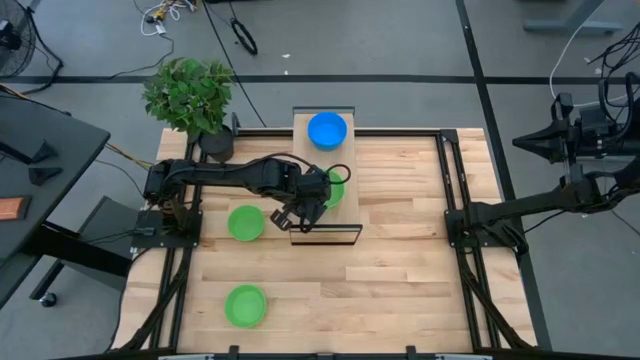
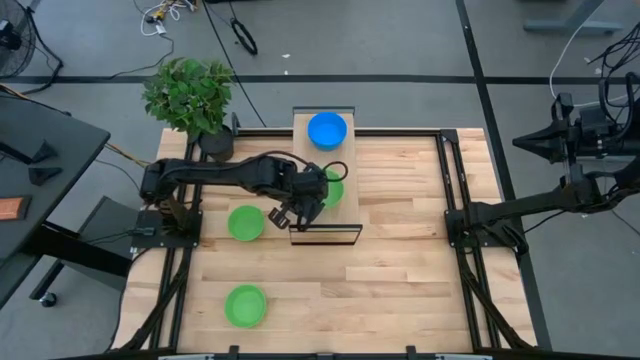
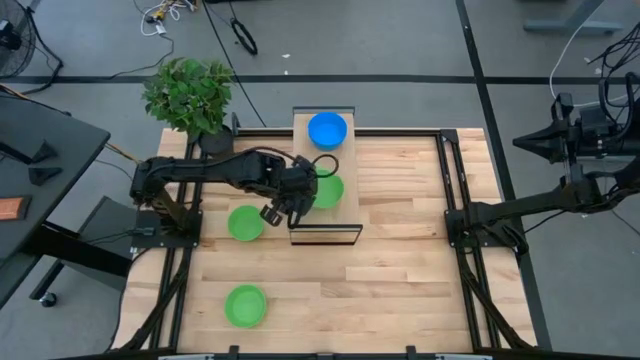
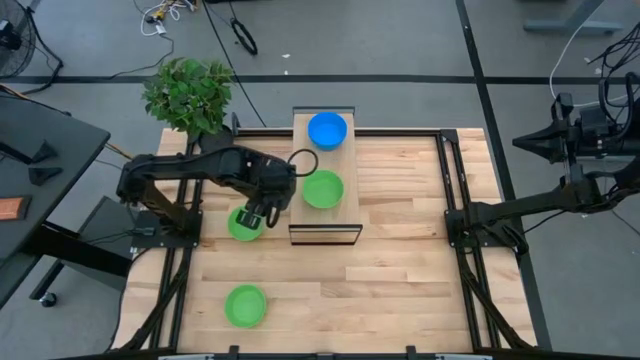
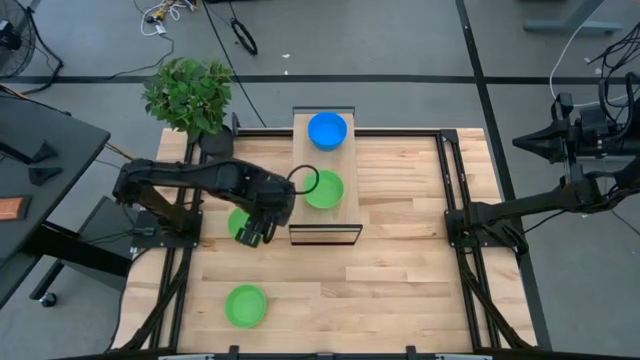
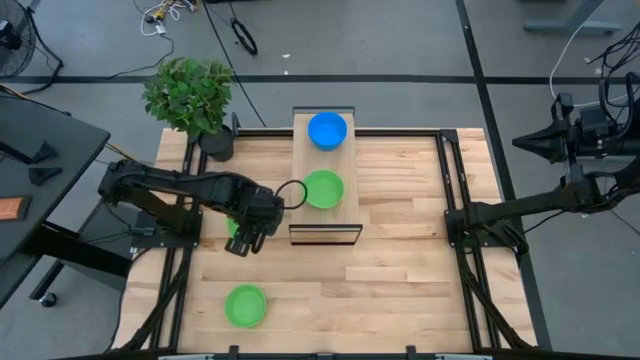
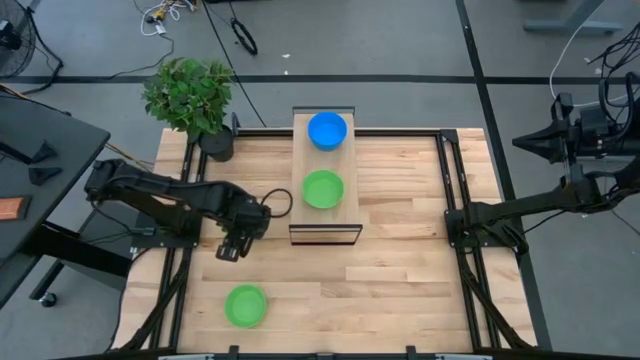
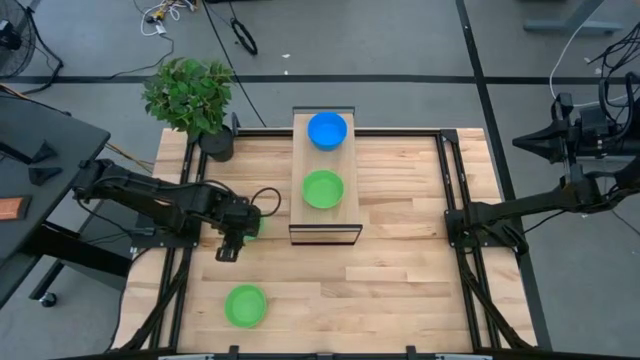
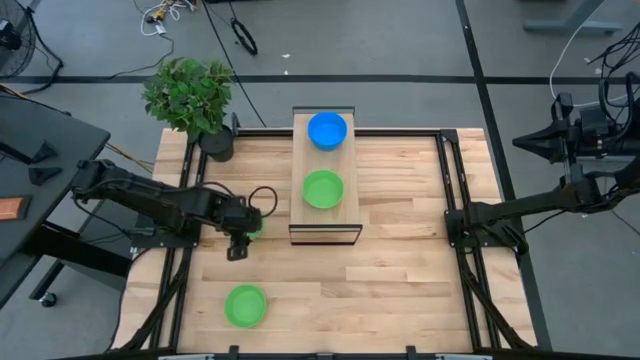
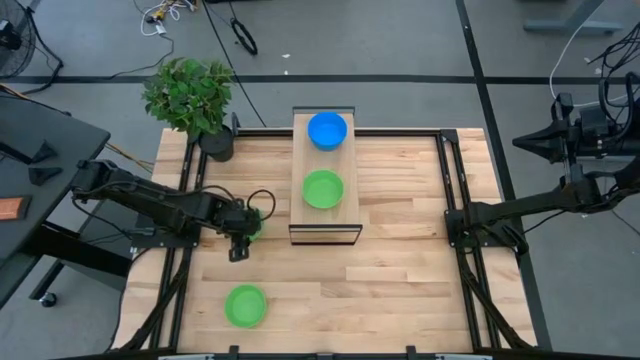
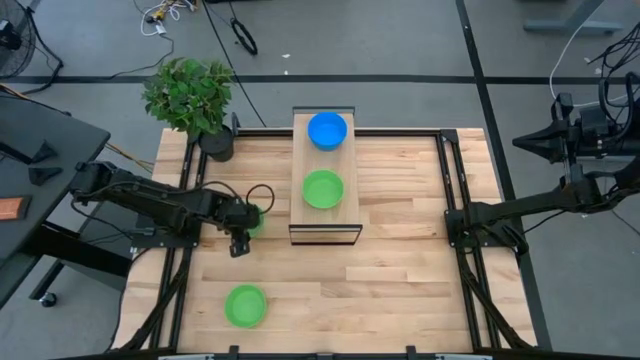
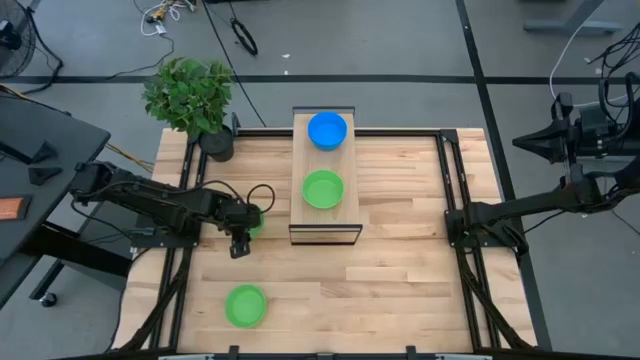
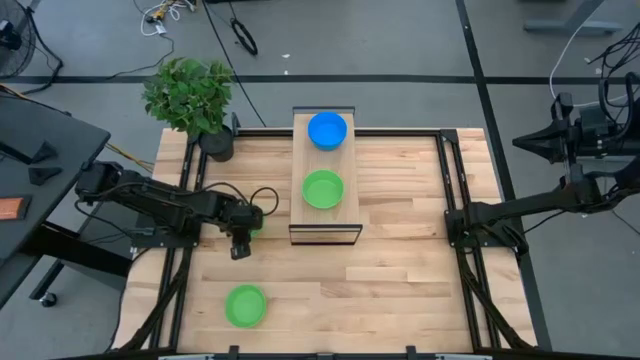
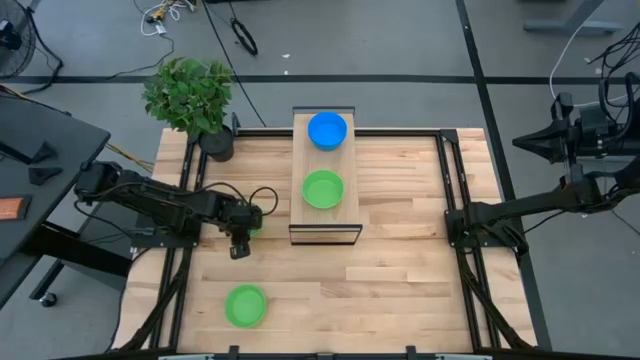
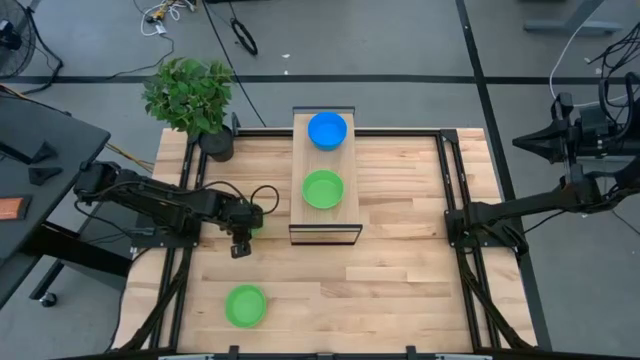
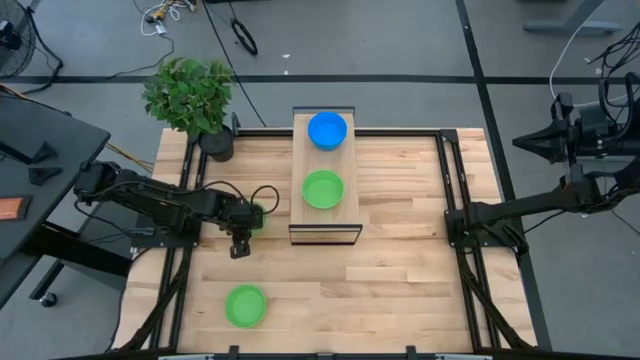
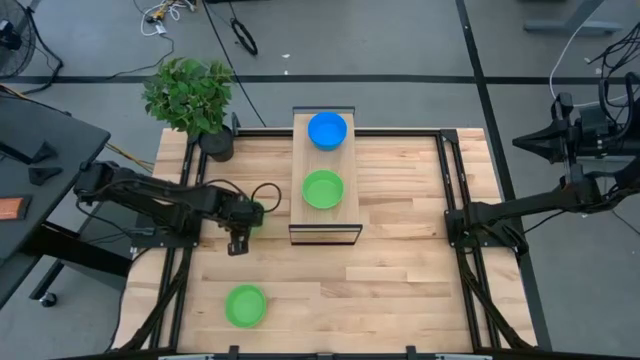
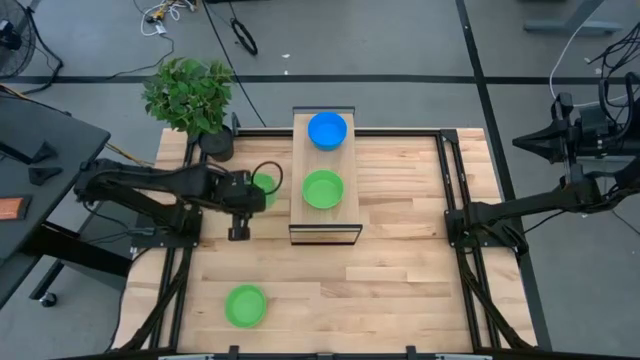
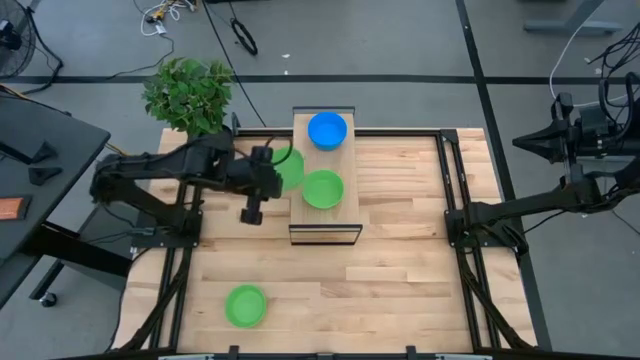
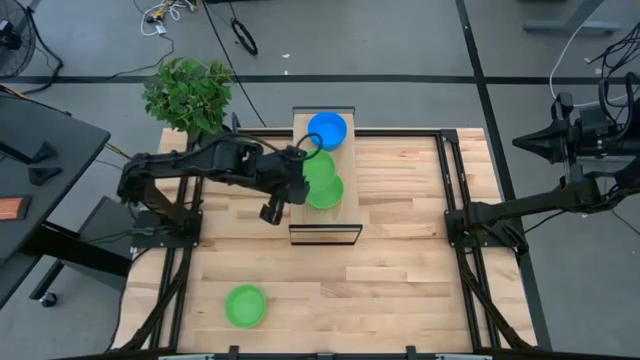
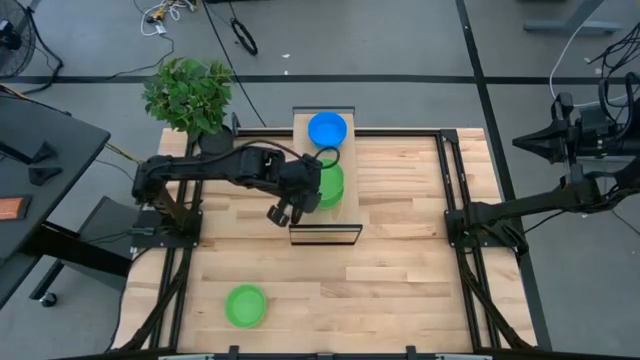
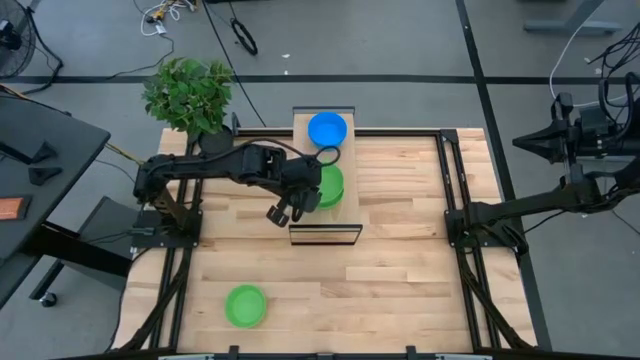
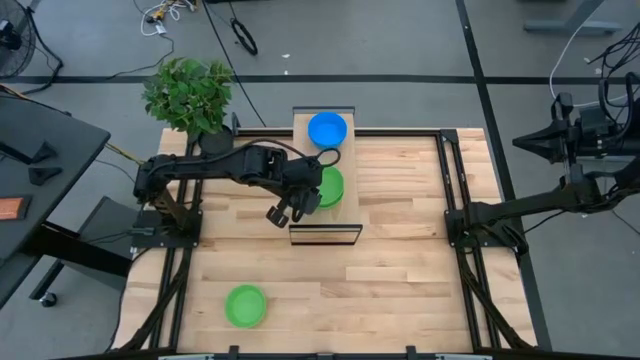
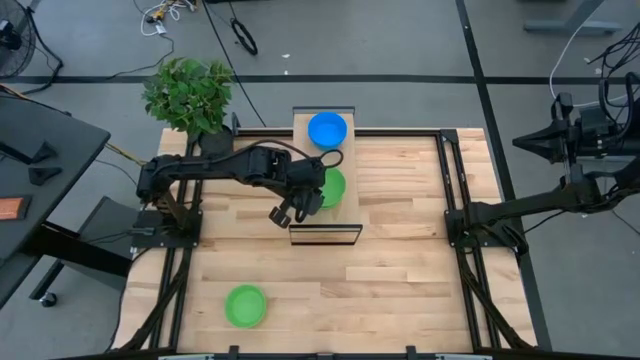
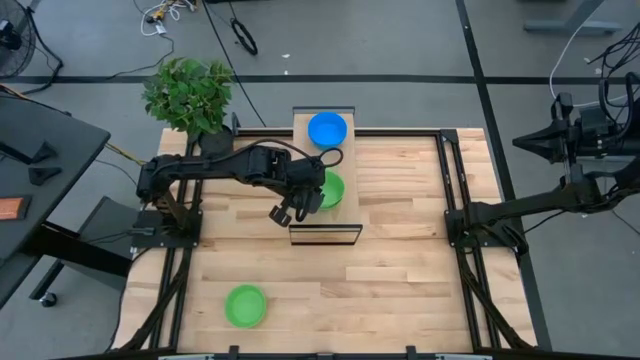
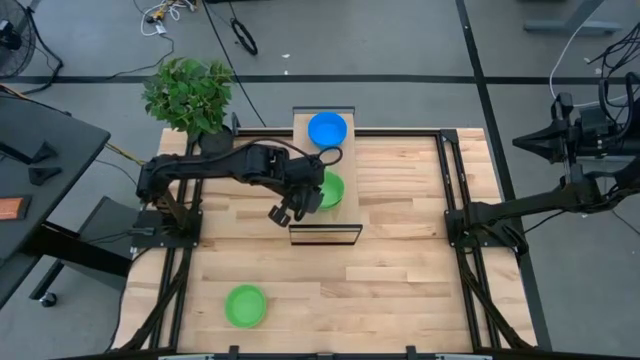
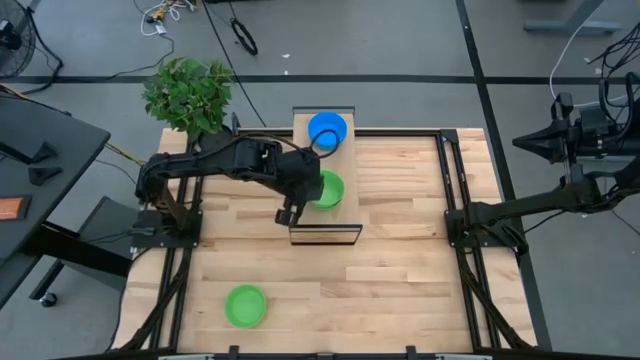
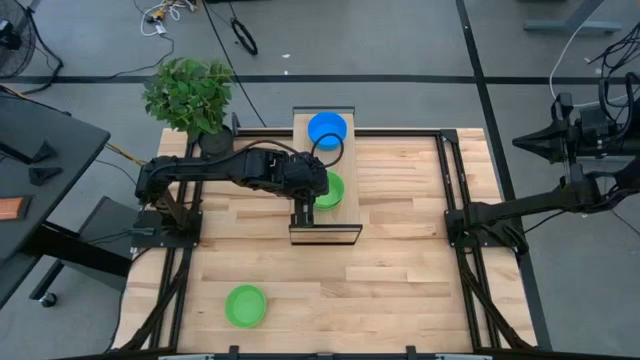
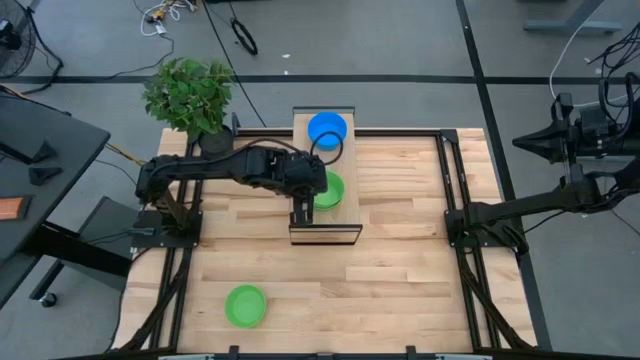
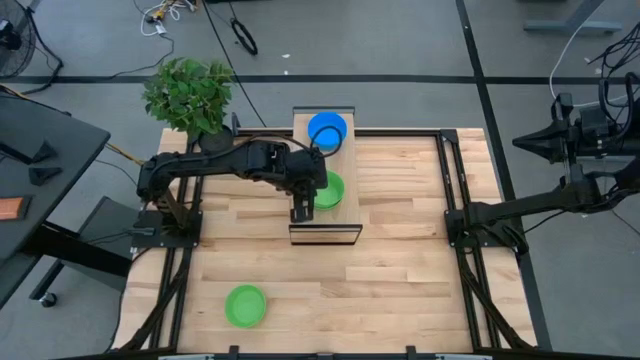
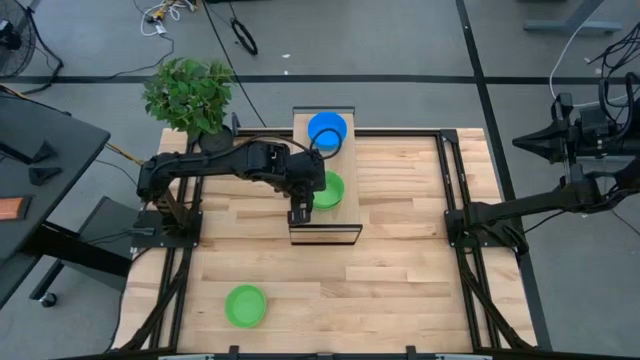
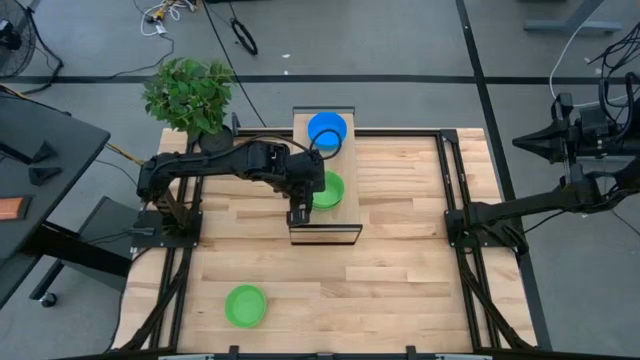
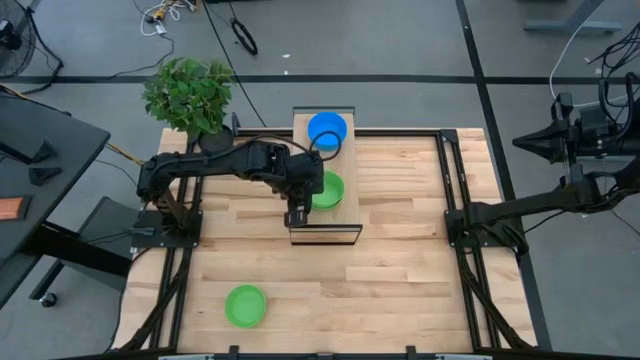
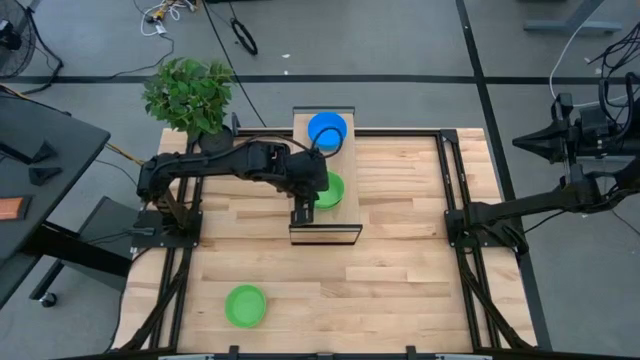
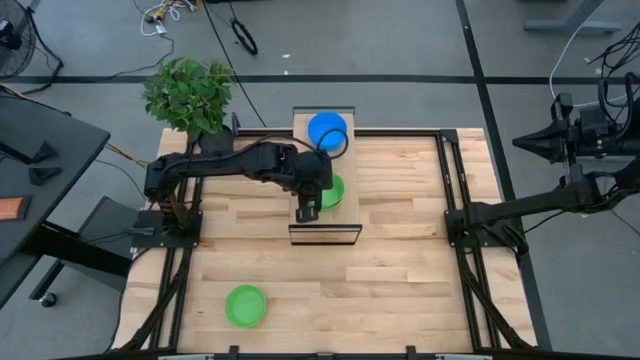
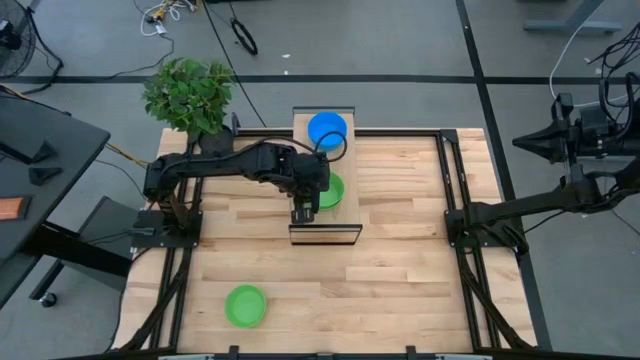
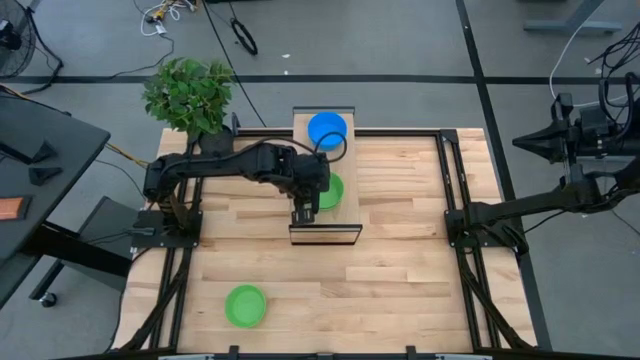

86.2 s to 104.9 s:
Task: Pick & Place Mini bowls
Stack the top green bowl on the green bowl on the shelf

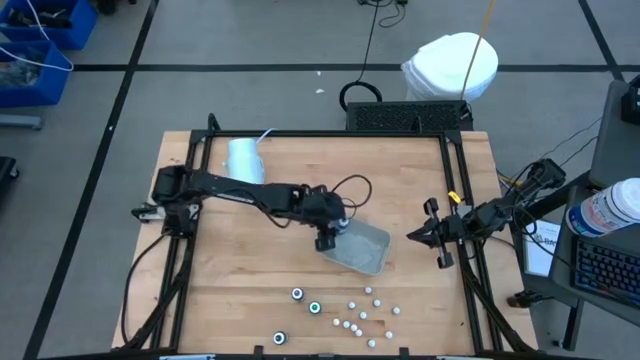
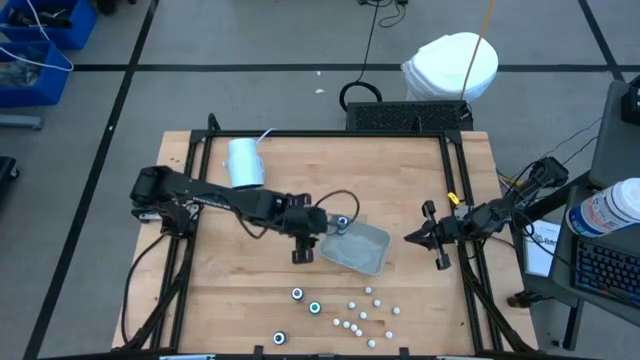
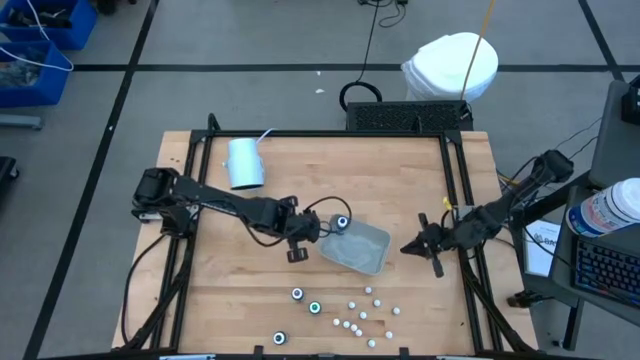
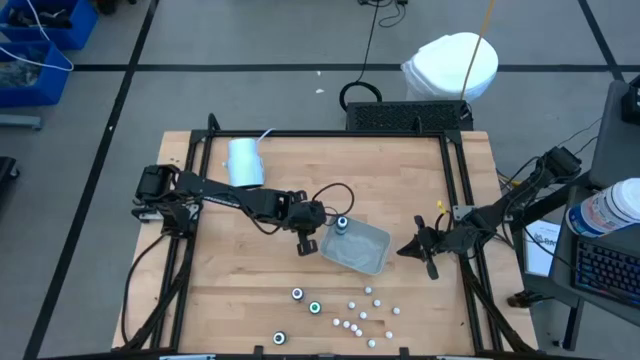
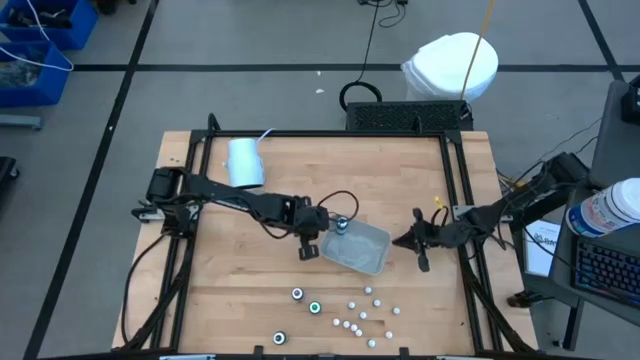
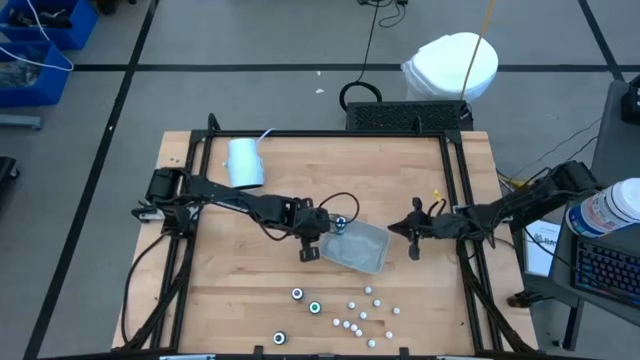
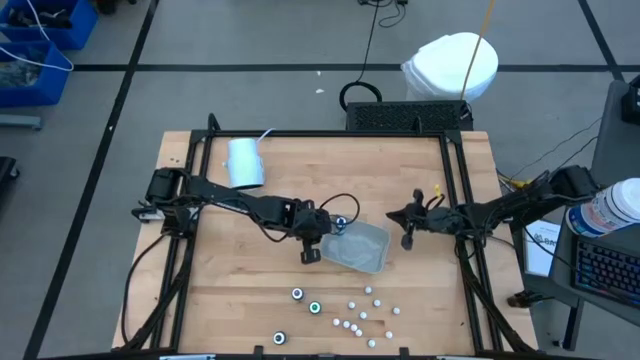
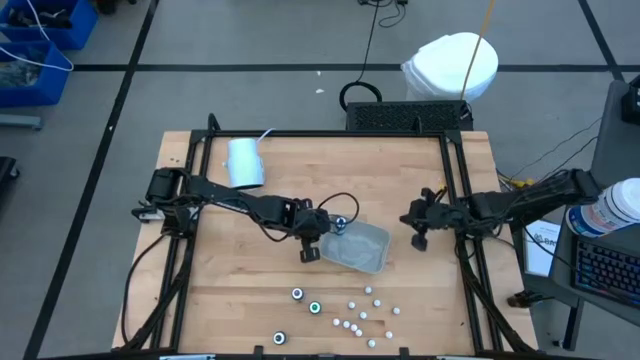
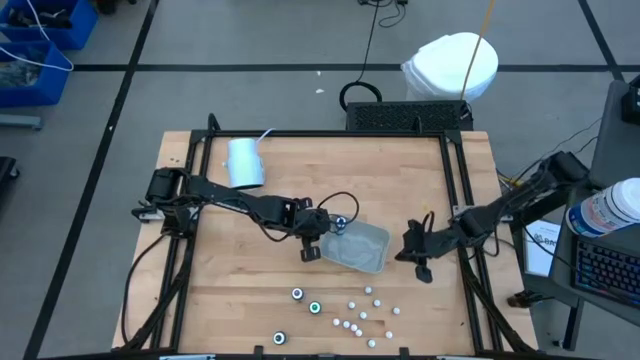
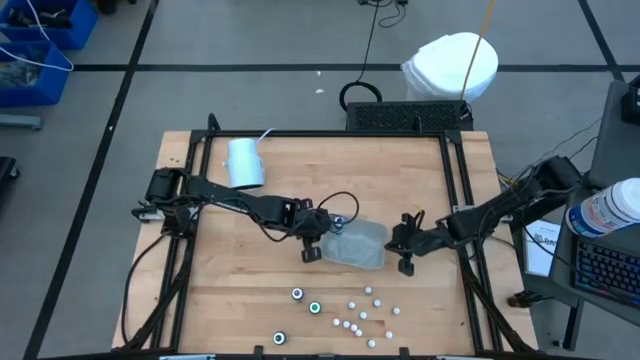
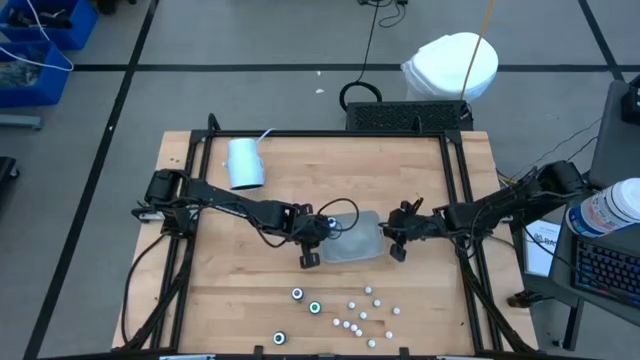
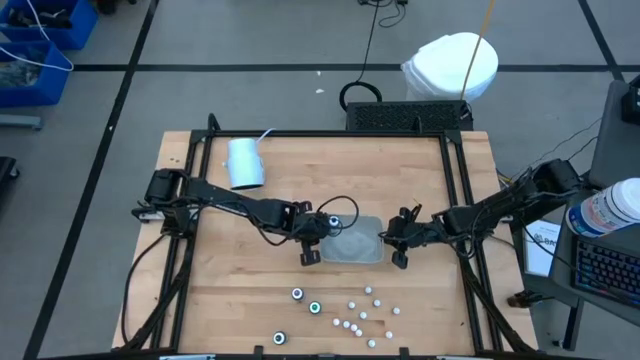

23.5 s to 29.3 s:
Task: Pick & Place food coloring
Adjust the gray bin on the table
